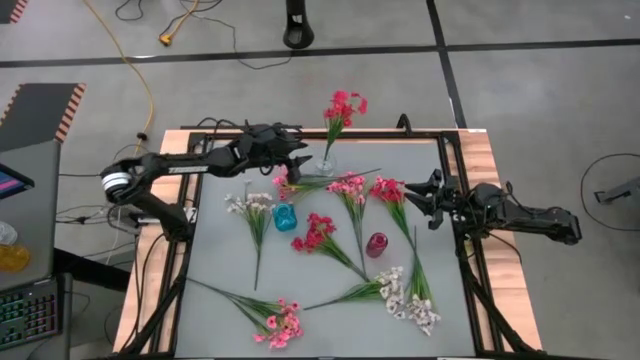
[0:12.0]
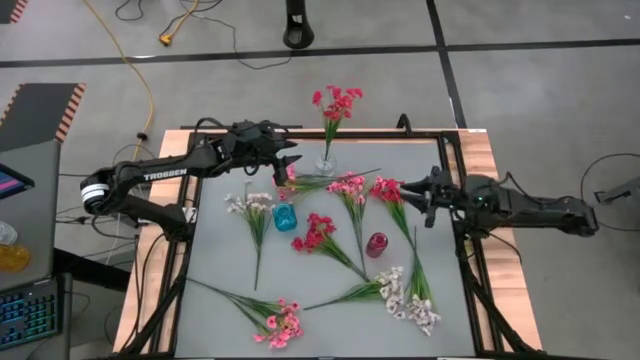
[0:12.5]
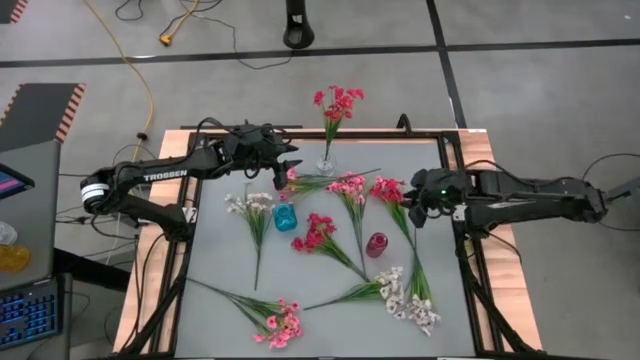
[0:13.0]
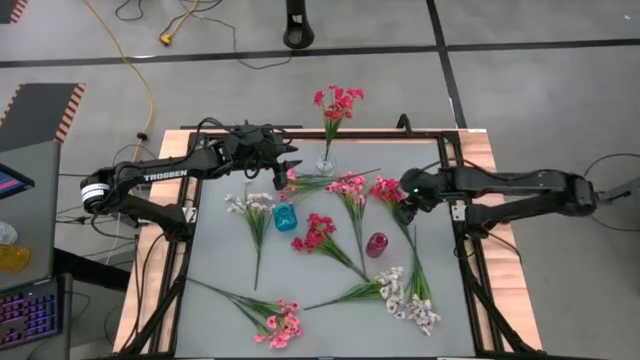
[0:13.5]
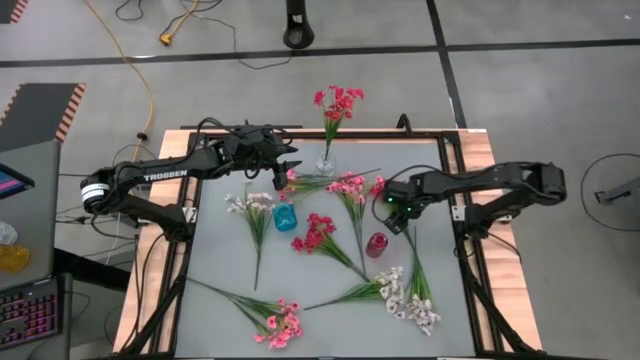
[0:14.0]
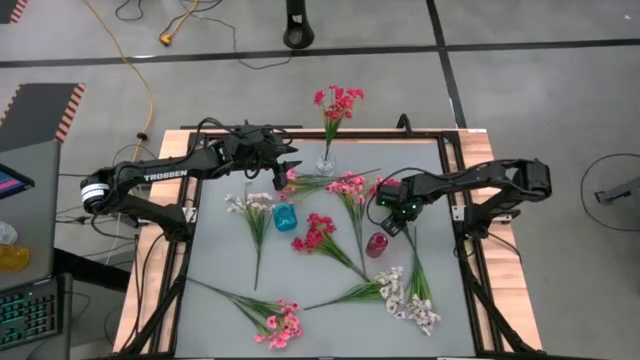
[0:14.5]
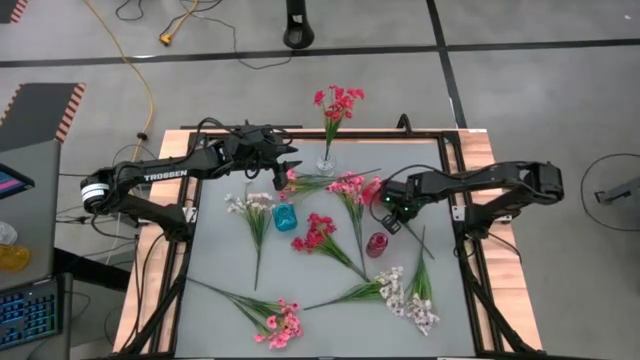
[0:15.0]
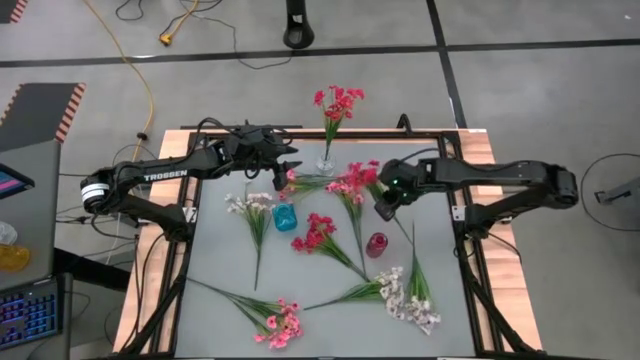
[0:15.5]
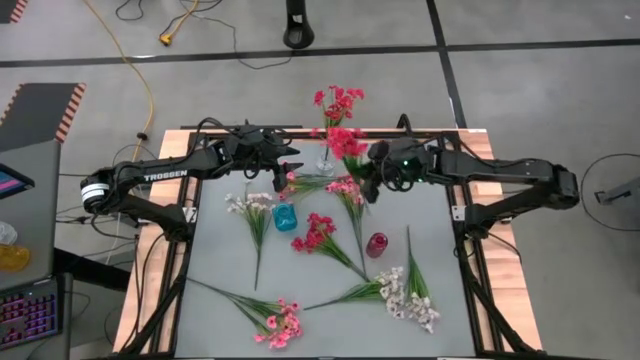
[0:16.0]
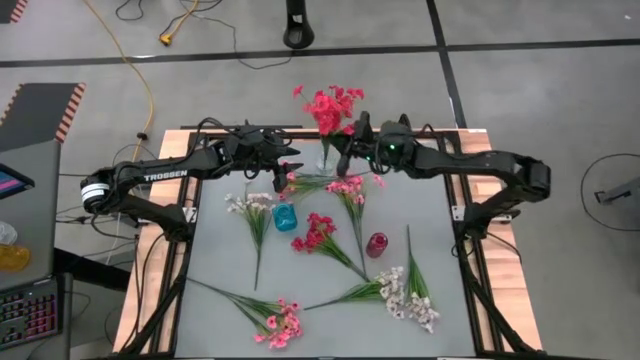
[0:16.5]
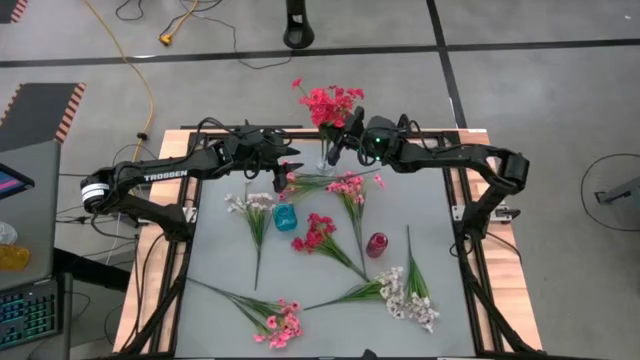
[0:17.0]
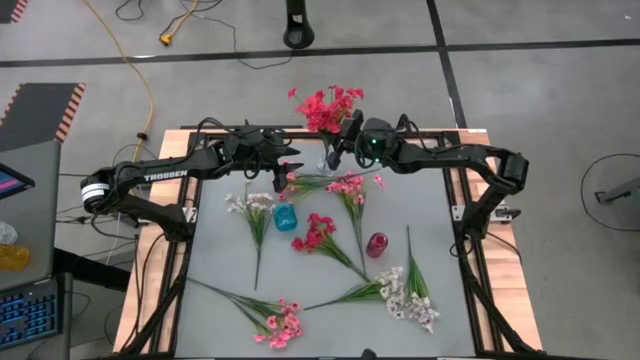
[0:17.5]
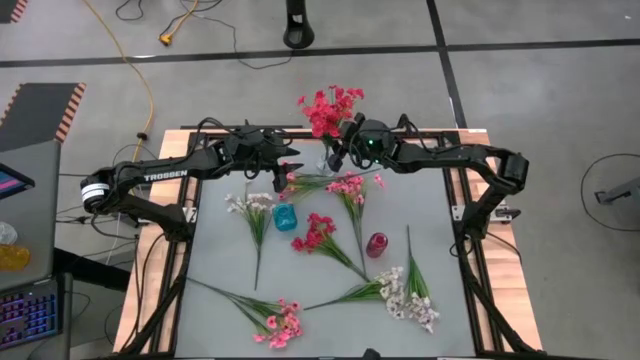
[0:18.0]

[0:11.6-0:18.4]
Task: Sort flowers into vase by color
Put the right red flower into the transparent vase

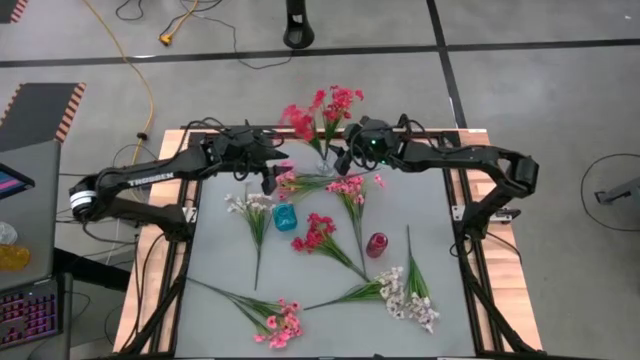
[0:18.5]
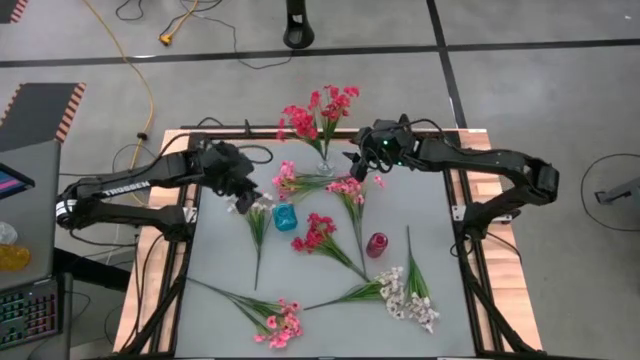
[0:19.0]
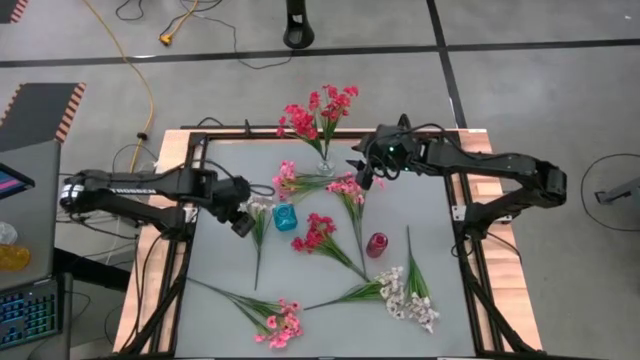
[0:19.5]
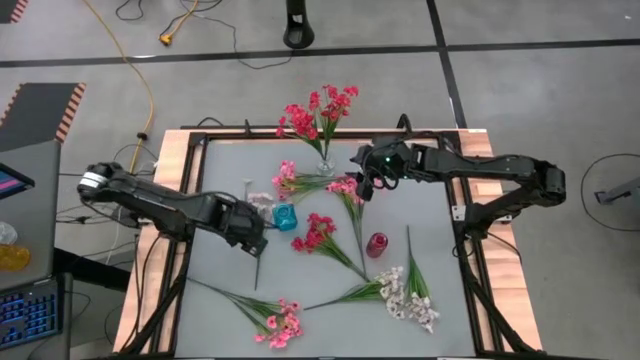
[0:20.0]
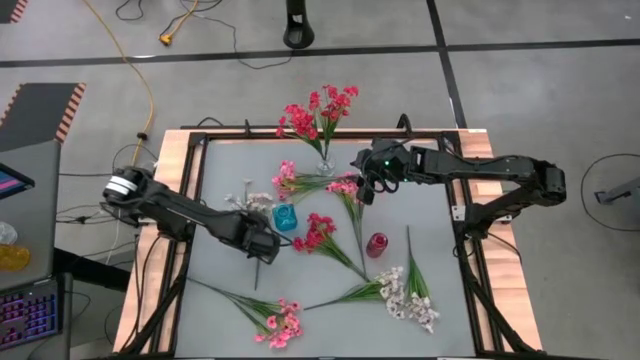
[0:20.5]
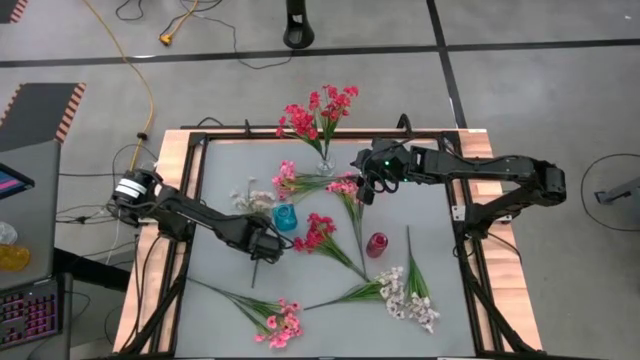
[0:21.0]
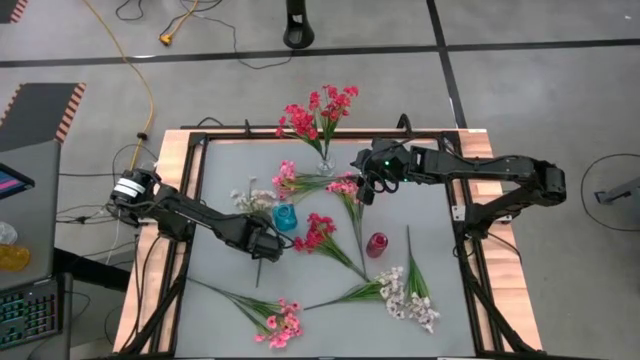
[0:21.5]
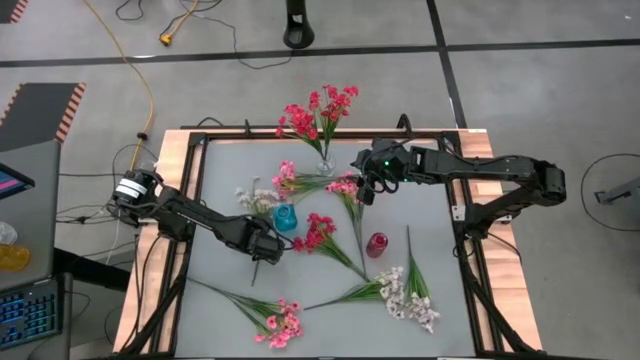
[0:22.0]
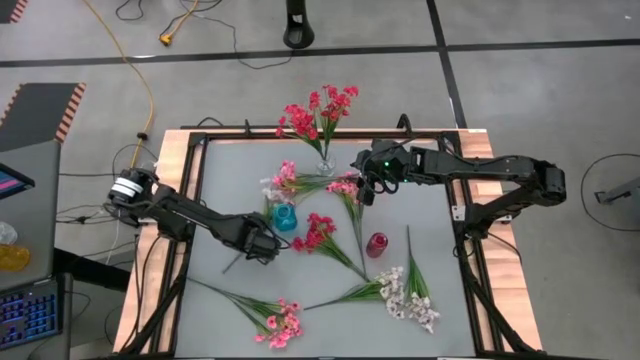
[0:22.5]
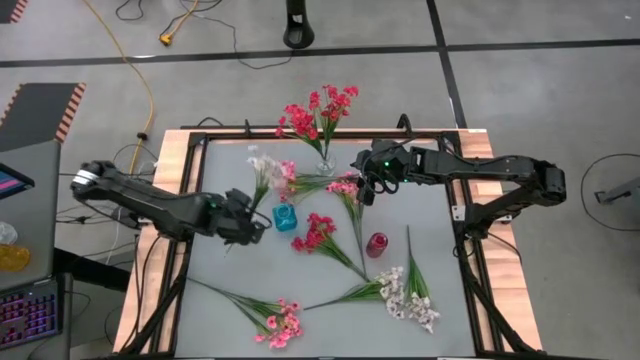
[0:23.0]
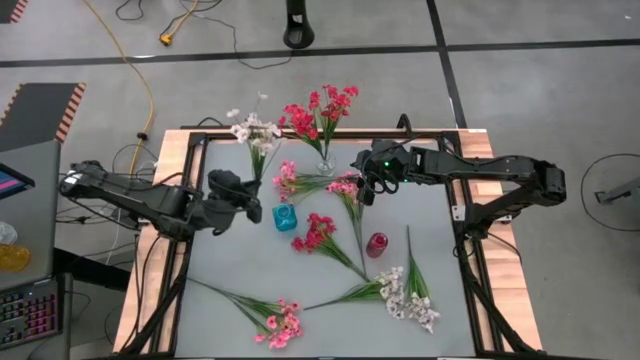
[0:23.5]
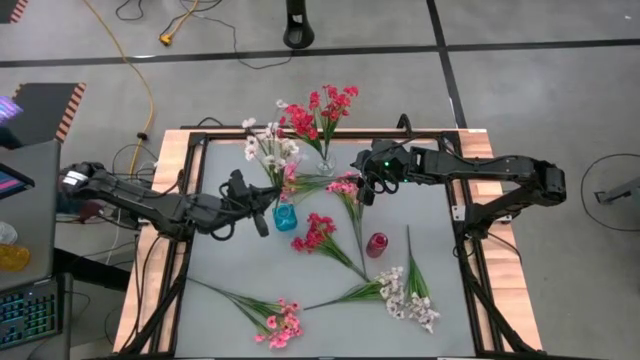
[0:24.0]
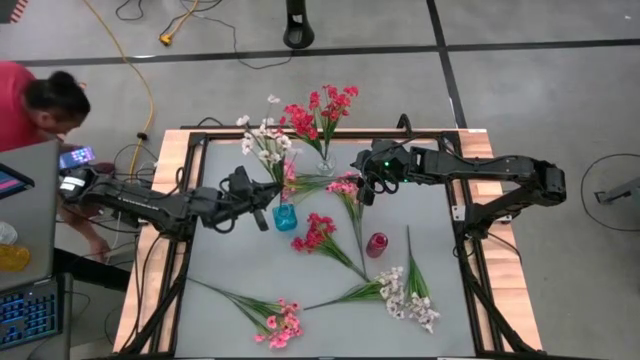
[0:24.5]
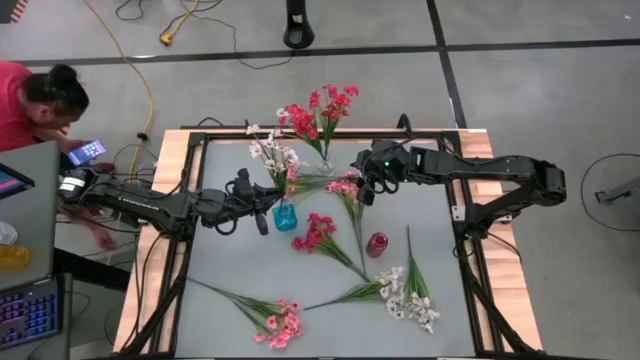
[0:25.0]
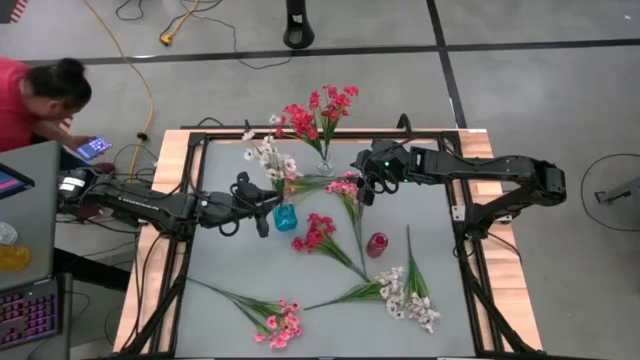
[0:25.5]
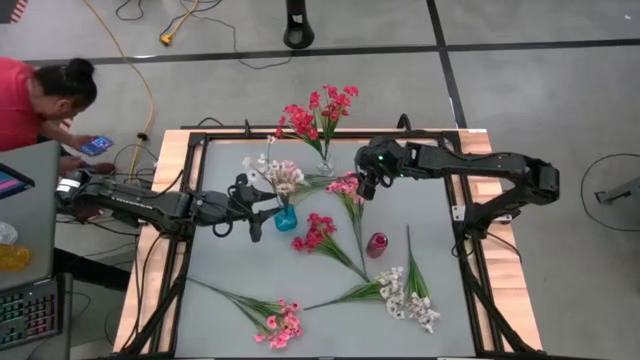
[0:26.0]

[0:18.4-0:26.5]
Put the left white flower into the blue vase

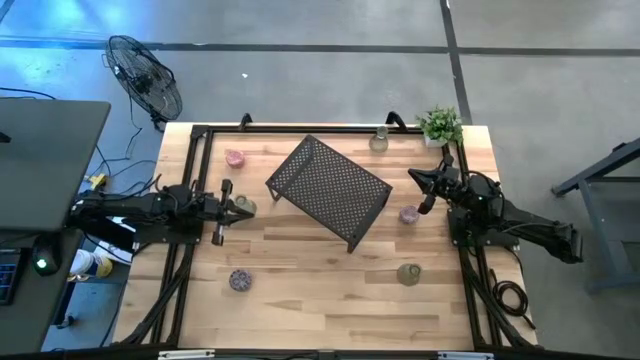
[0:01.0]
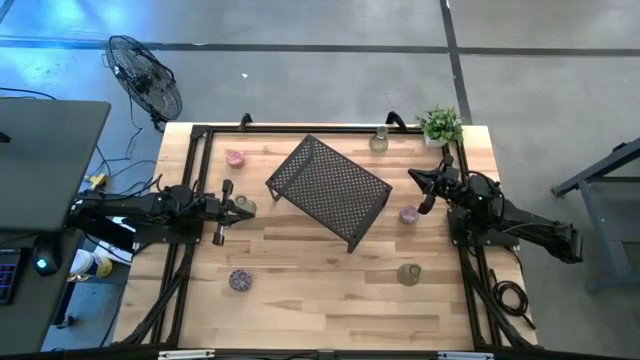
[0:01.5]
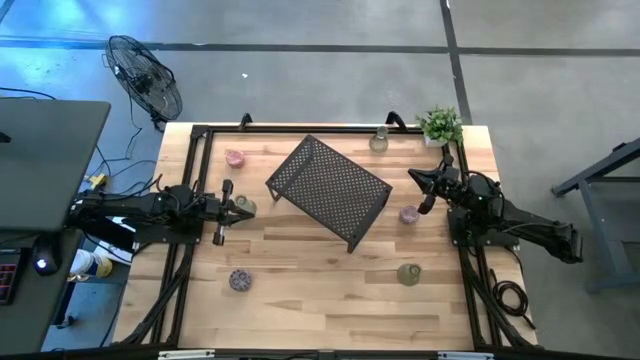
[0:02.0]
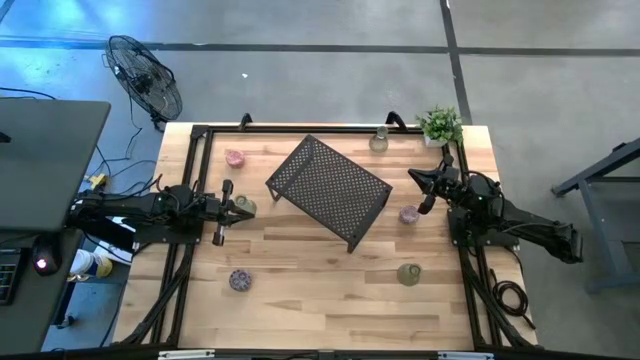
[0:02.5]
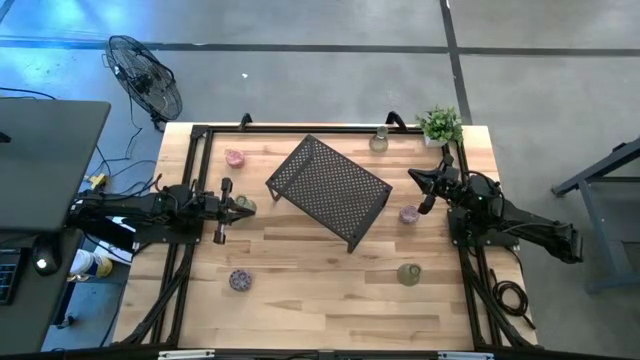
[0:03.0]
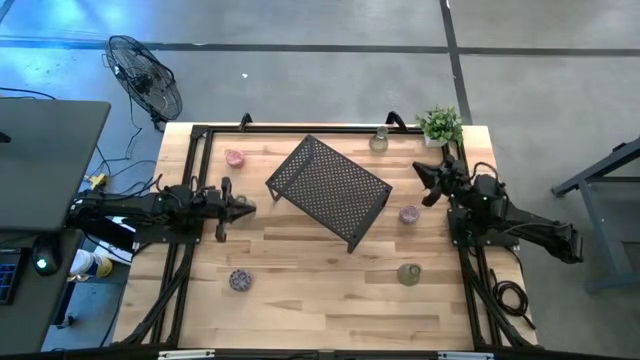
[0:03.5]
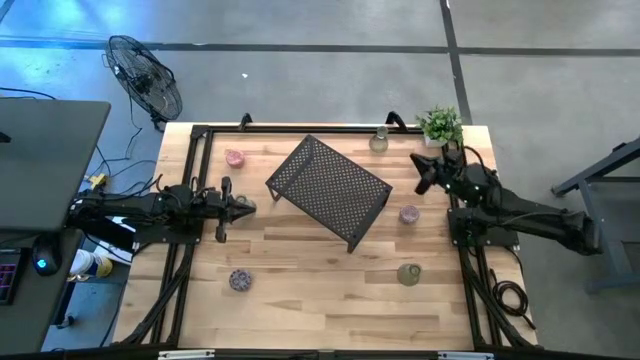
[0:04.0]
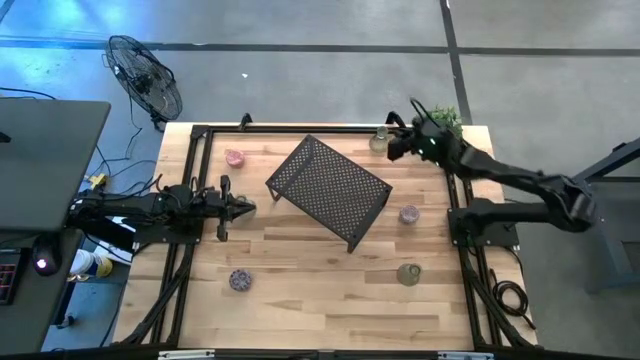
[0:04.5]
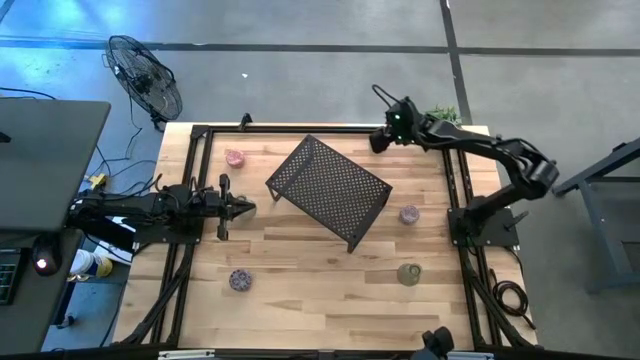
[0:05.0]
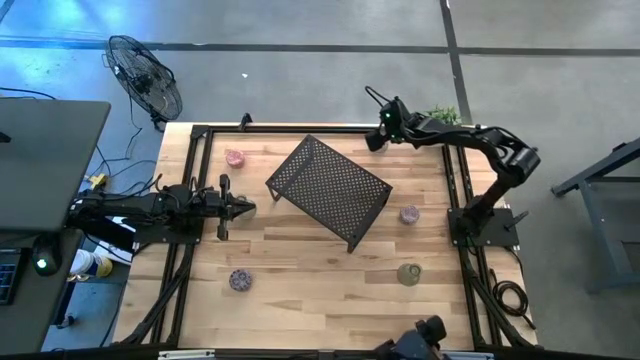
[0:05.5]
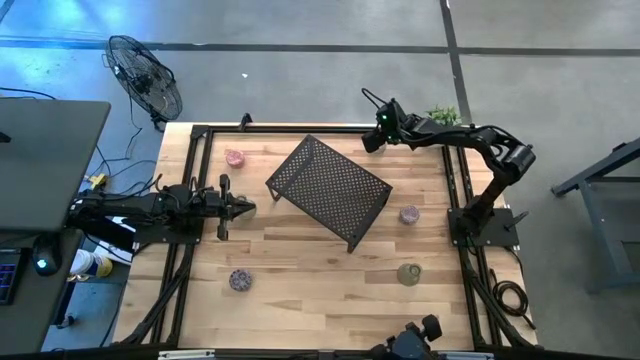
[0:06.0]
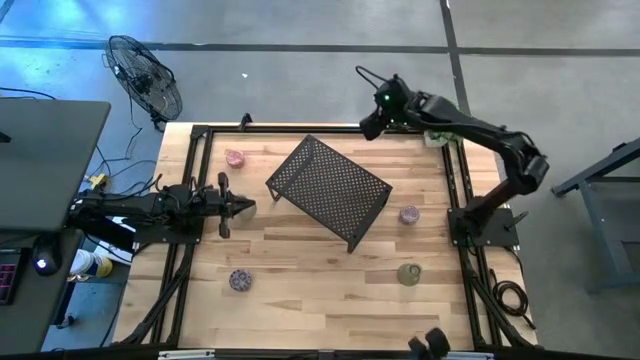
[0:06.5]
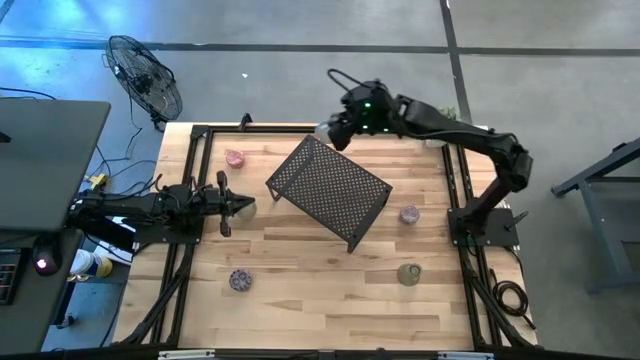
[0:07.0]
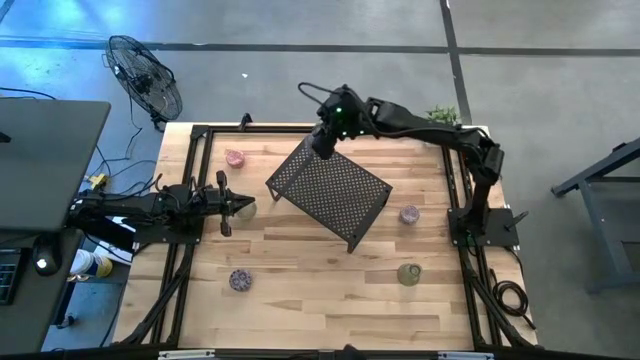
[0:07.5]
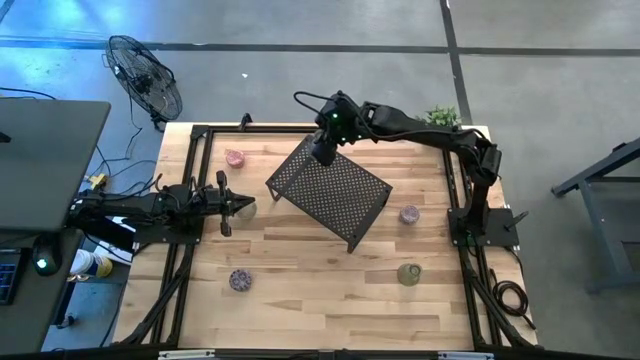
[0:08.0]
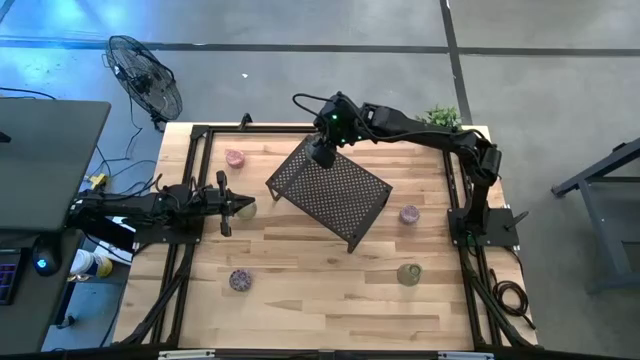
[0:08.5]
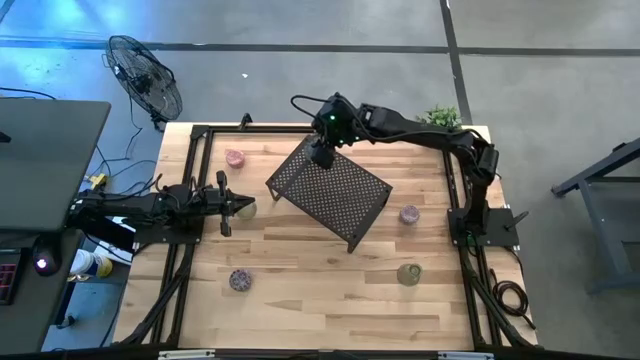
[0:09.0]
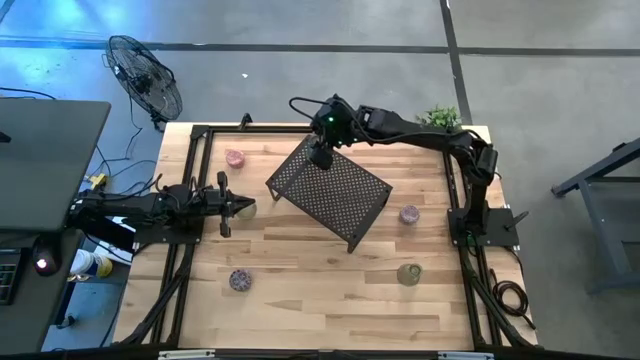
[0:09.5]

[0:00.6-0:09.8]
Task: Pick & Place candle stick holders
Put the top green candle holder on the shelf
